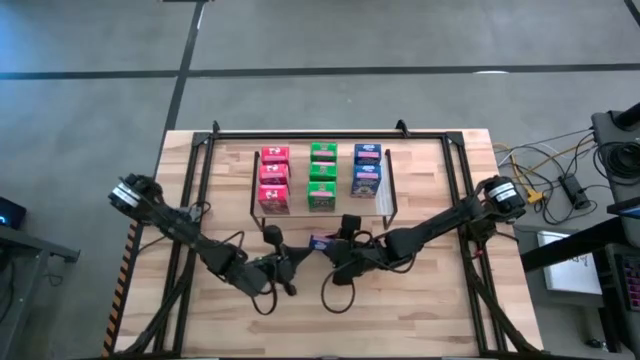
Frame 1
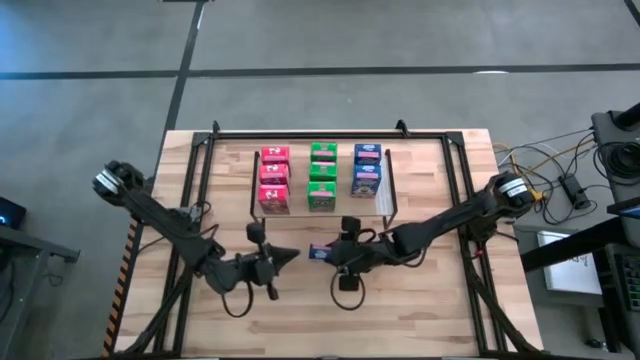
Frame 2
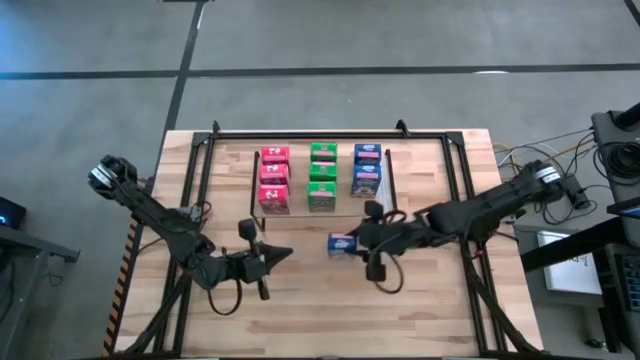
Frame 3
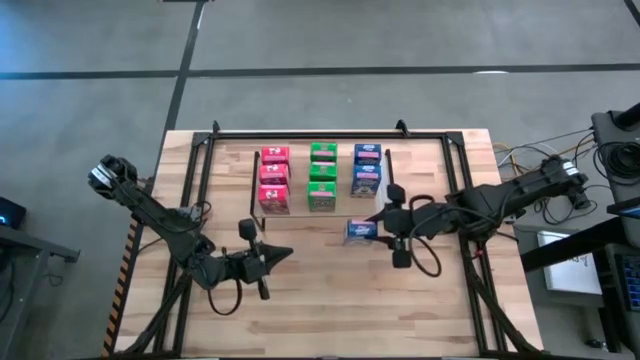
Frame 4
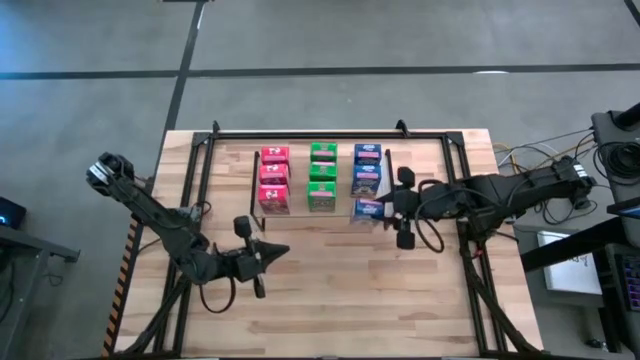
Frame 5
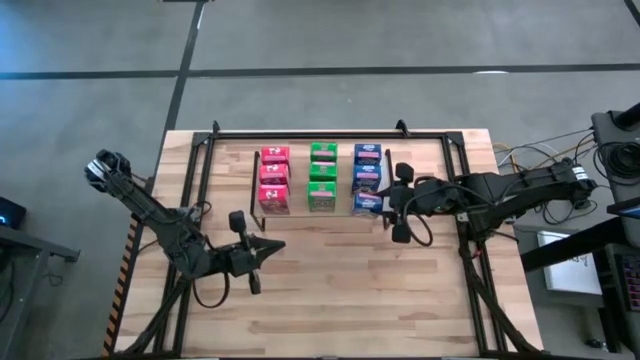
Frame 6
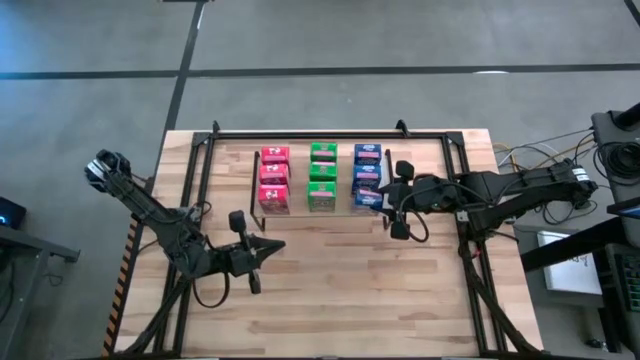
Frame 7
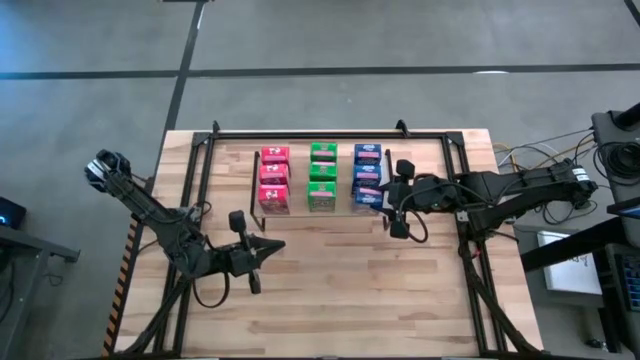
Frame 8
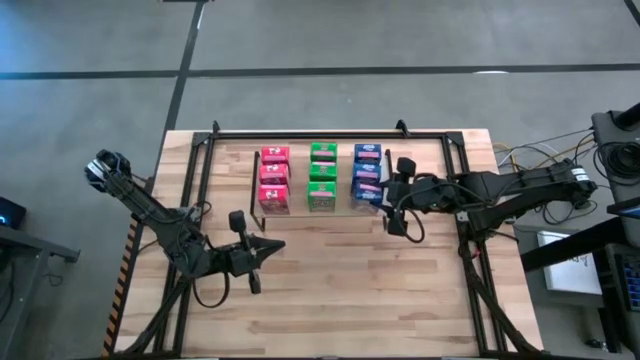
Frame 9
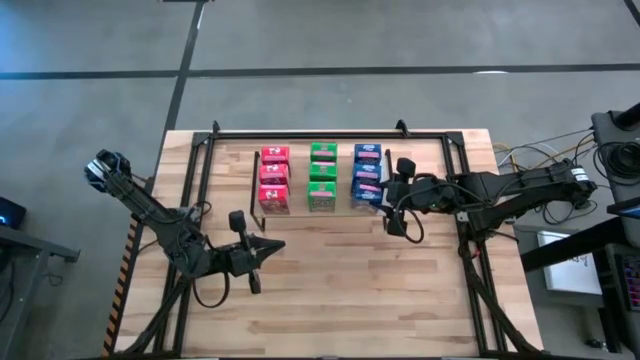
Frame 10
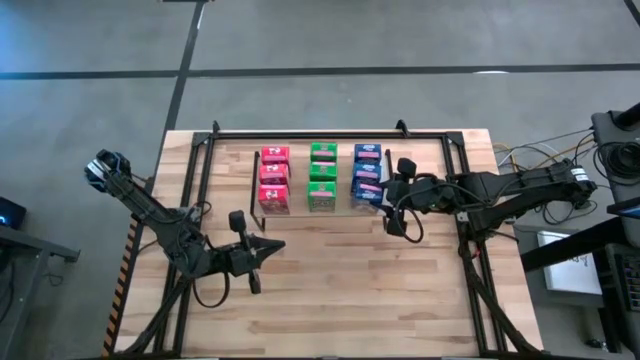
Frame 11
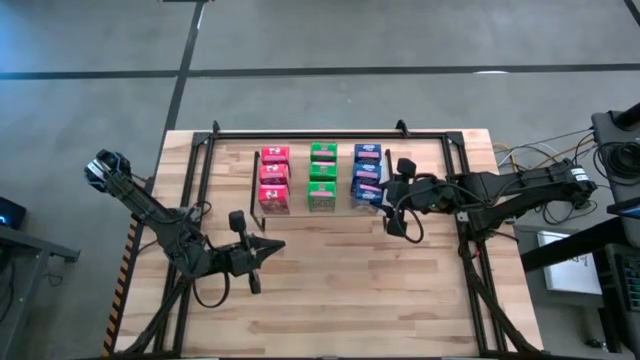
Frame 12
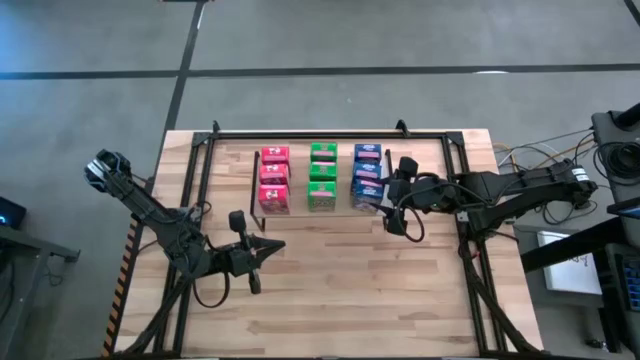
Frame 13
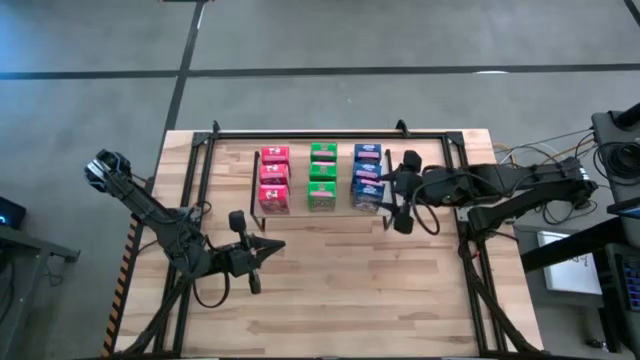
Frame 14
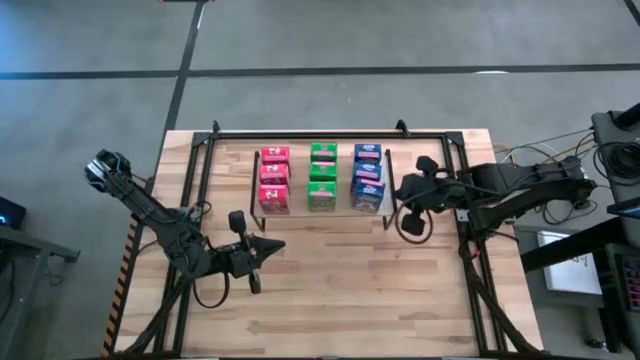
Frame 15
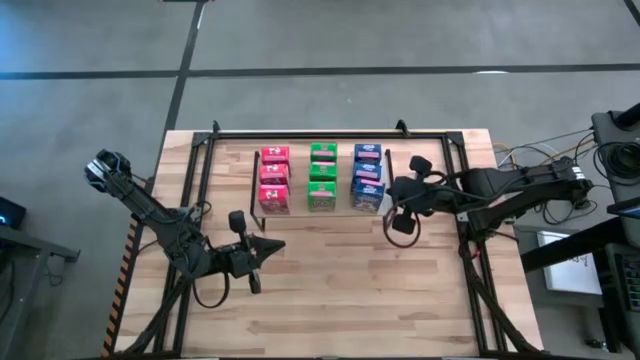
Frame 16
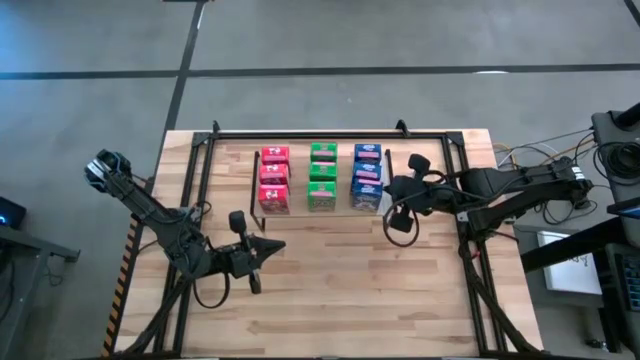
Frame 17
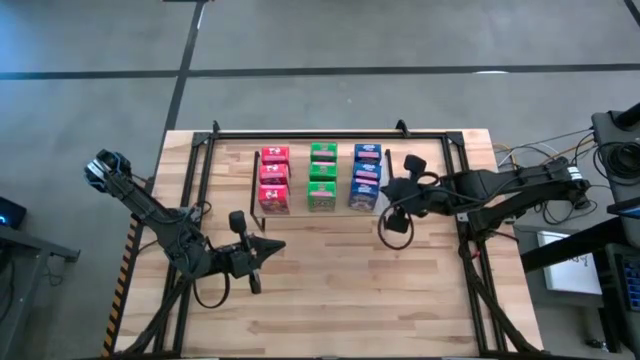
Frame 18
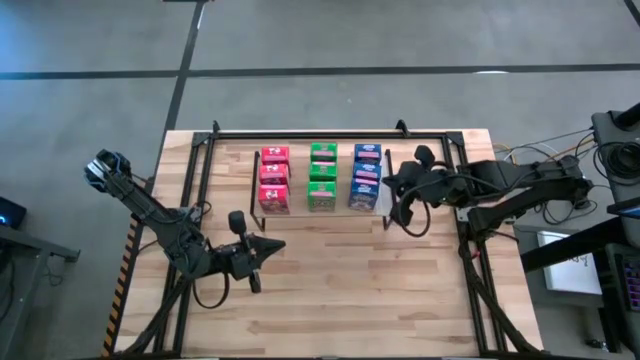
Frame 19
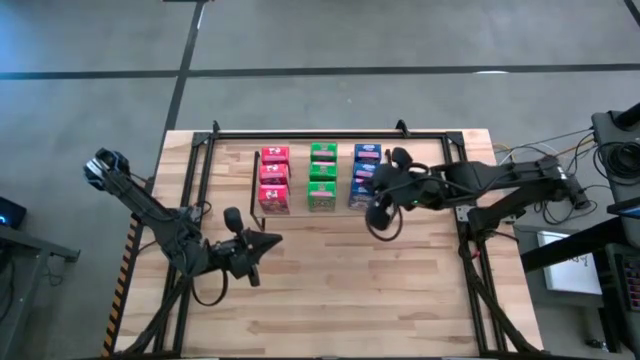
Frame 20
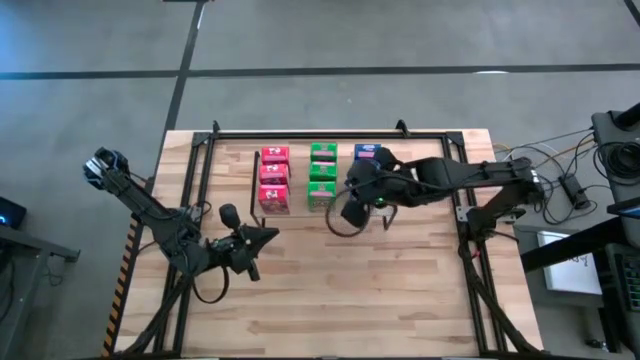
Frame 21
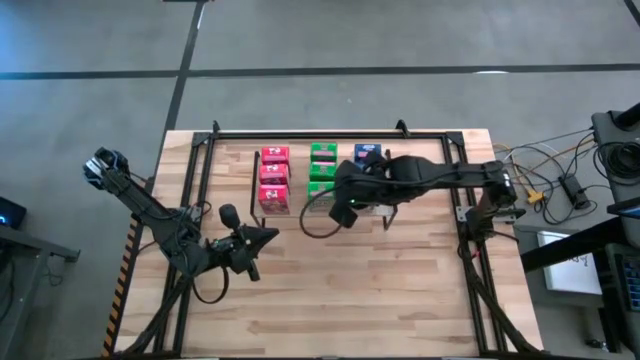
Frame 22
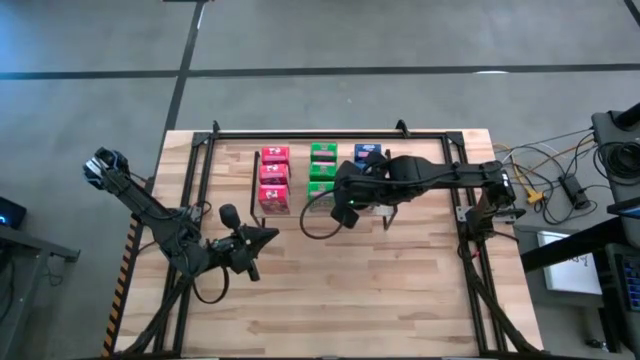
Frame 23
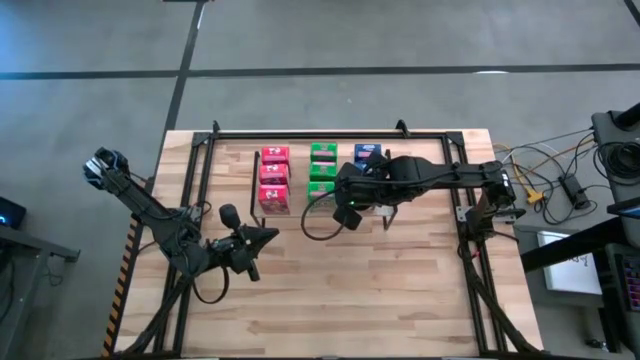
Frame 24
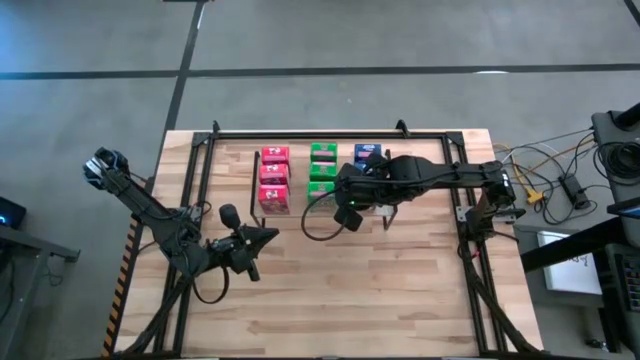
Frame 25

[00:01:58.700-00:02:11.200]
Task: Stack cereal on shelf
Put the blue cereal box on the shelf, aligned with the other blue cereal boxes

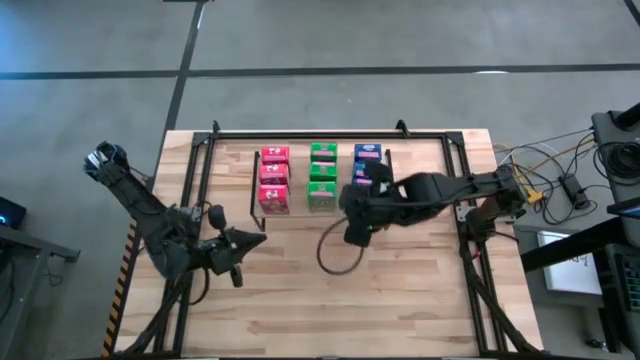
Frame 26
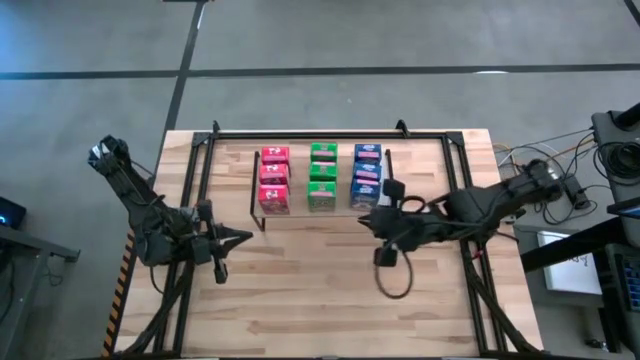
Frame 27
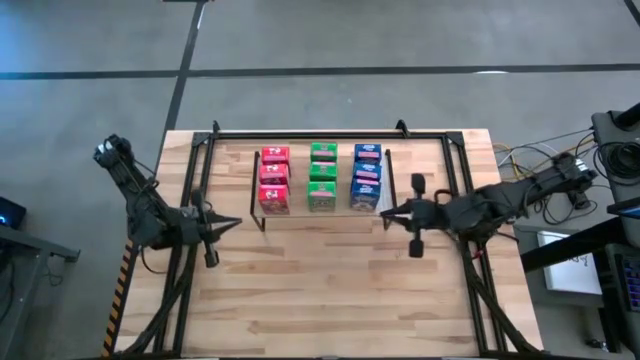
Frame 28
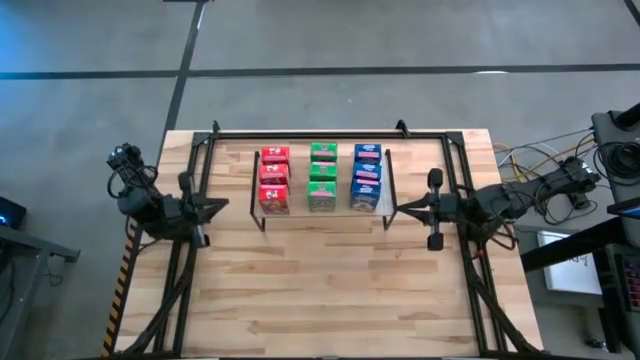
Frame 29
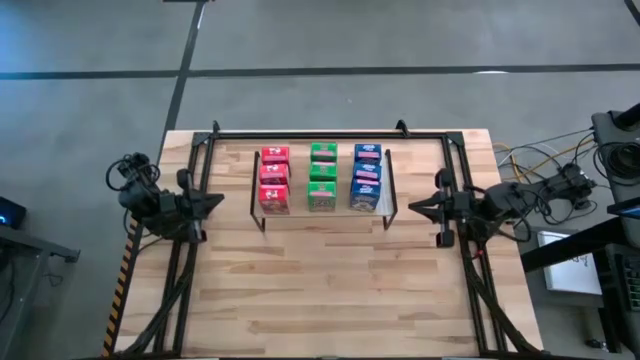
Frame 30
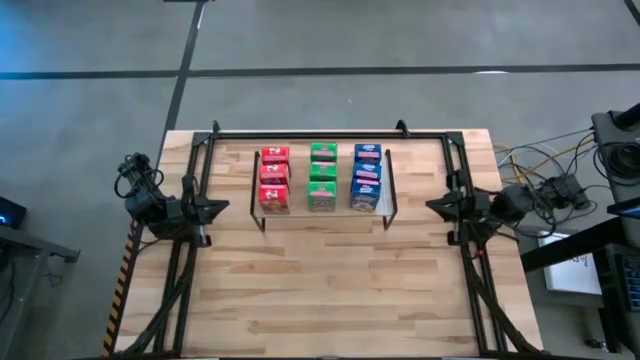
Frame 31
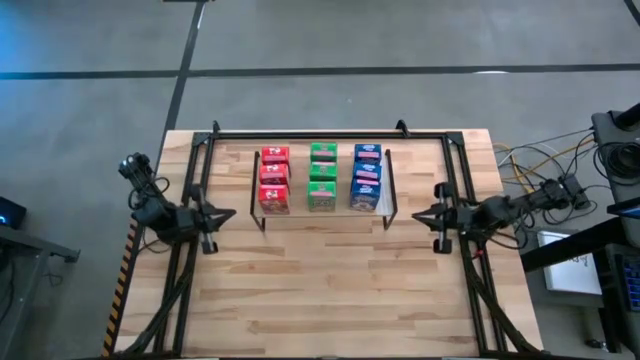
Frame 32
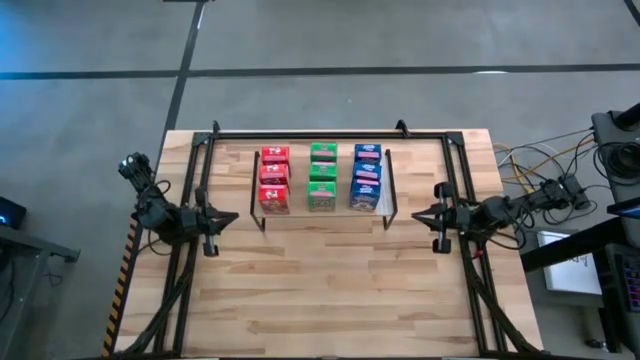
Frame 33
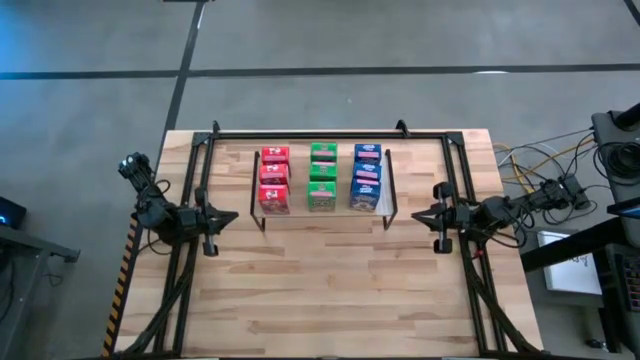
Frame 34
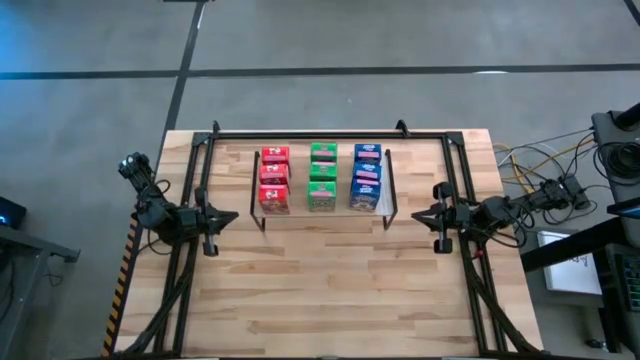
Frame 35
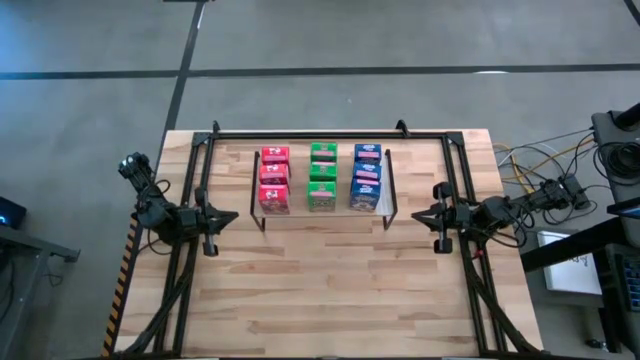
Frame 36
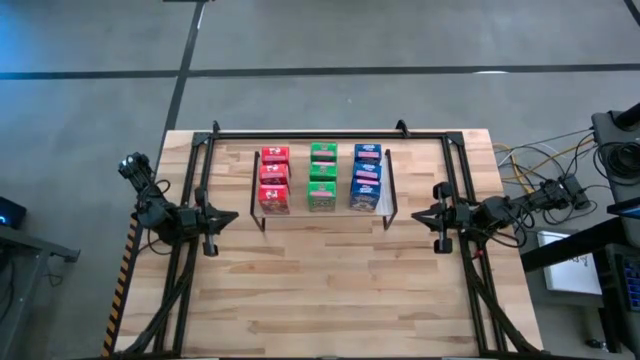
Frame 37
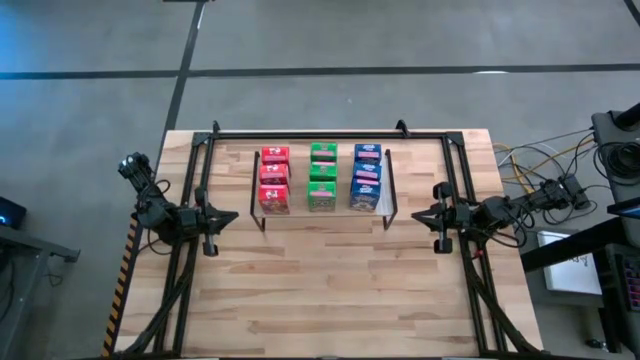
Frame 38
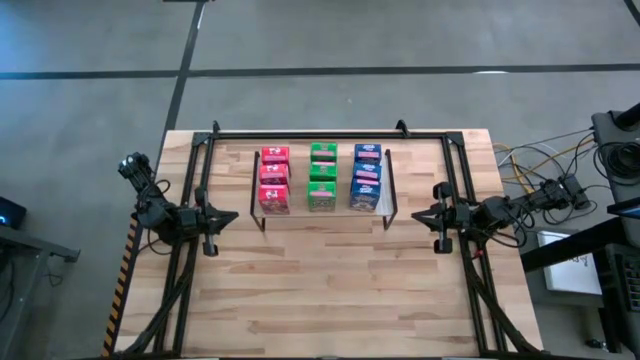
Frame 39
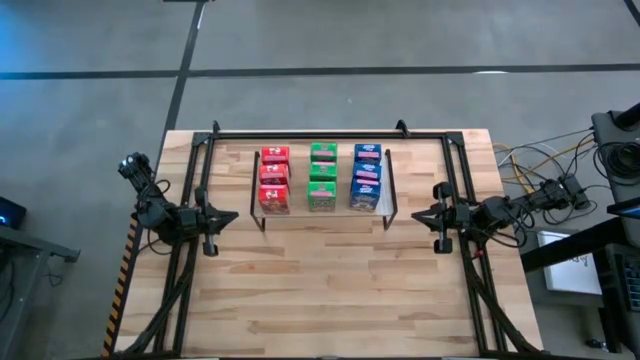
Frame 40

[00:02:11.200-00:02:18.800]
Return to home position

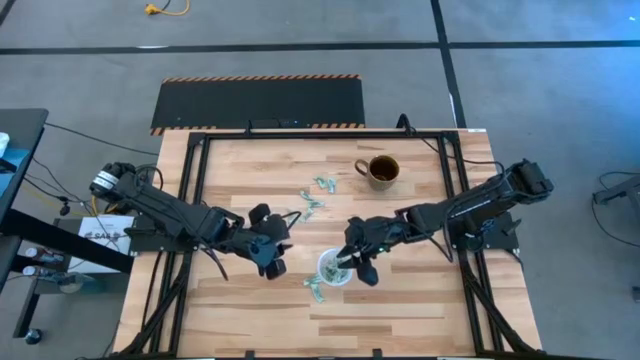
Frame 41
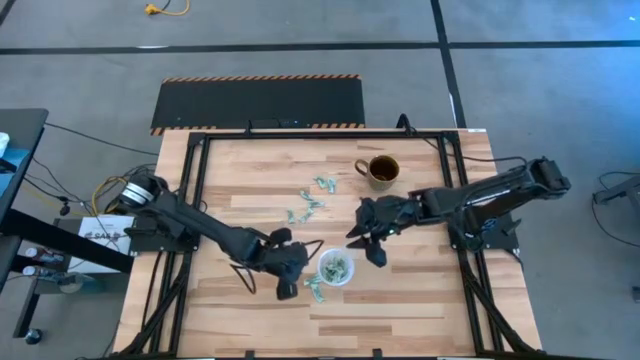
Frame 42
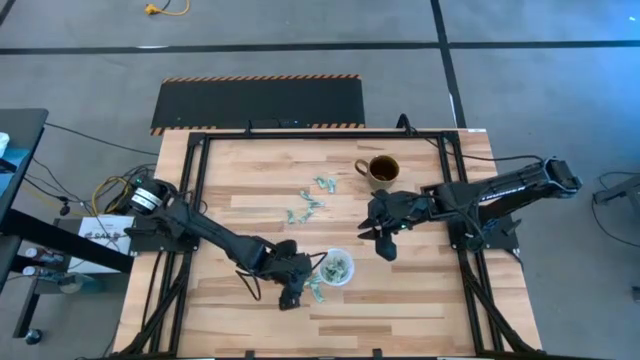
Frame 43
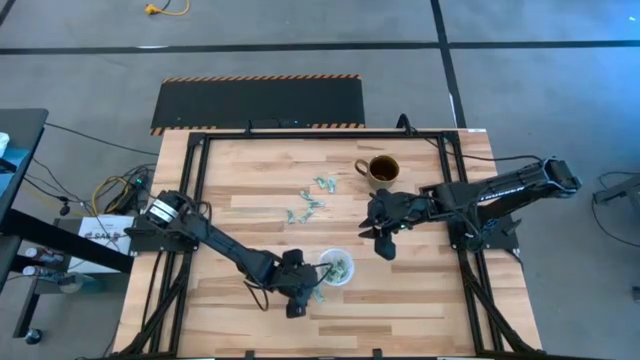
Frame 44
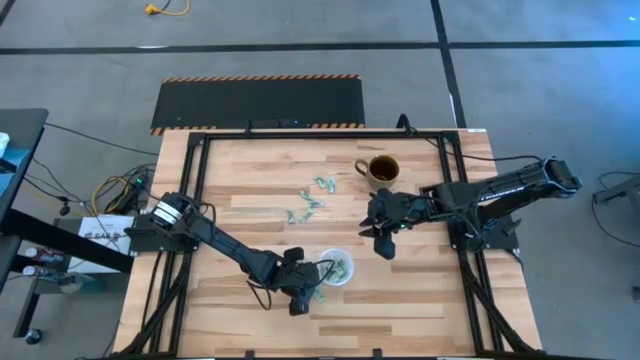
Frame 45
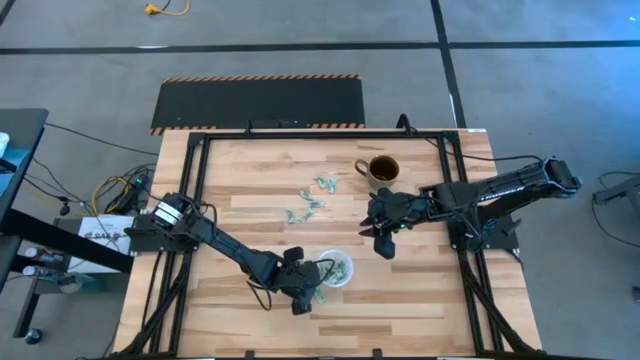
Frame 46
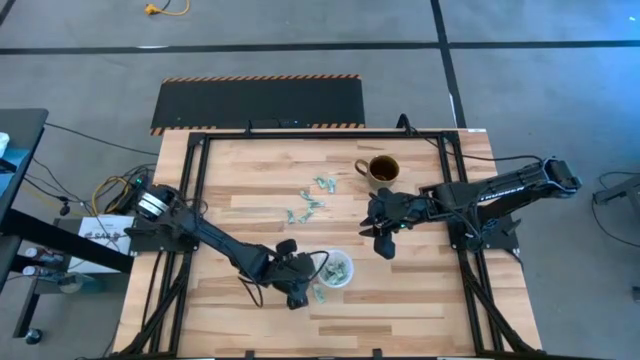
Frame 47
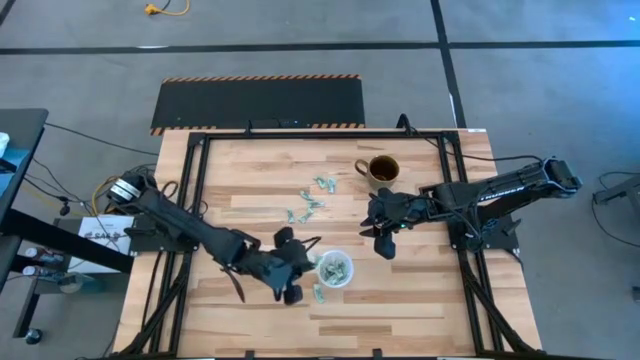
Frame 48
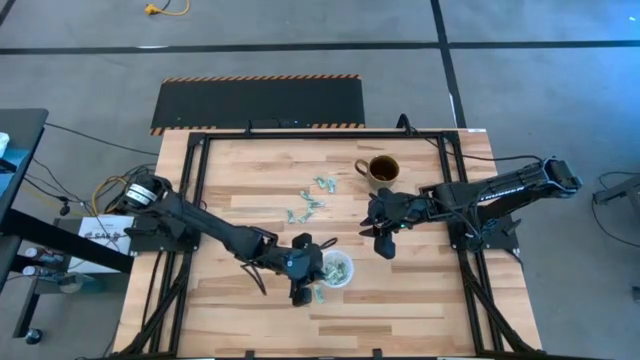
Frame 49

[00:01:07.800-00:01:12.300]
Task: Pick and place Stevia / Truvia into bins
Put the green stevia packet into the transparent container
